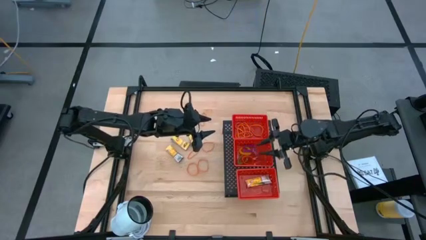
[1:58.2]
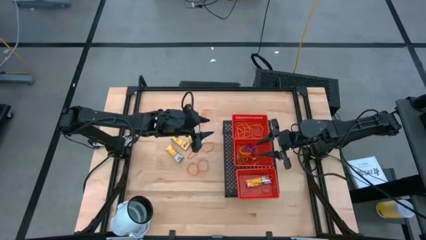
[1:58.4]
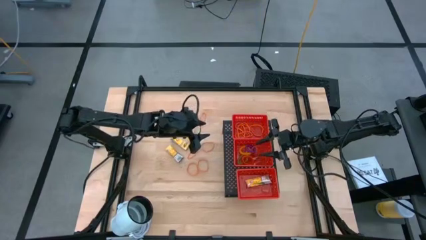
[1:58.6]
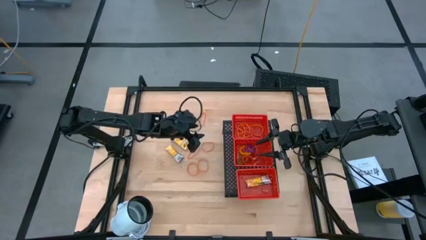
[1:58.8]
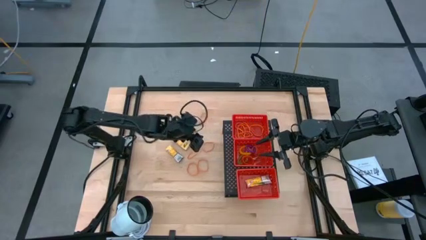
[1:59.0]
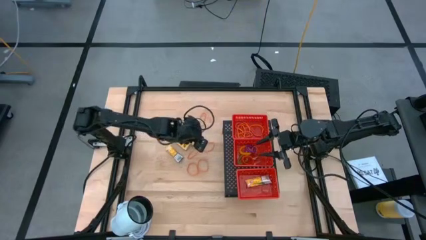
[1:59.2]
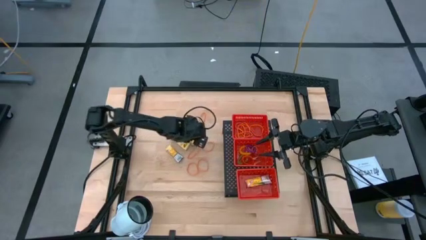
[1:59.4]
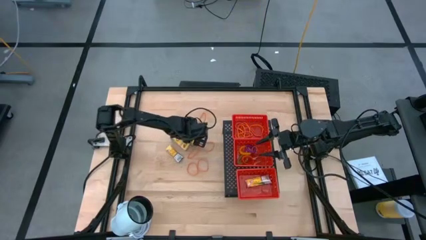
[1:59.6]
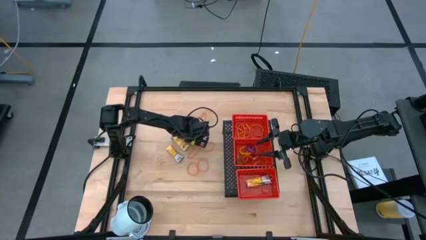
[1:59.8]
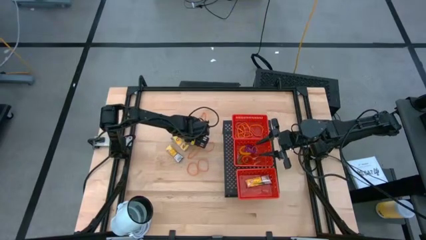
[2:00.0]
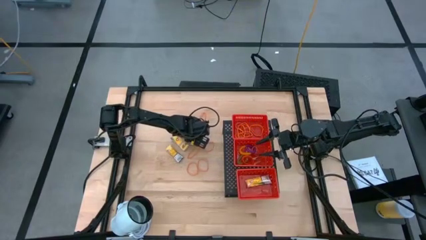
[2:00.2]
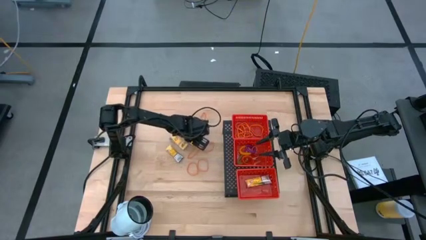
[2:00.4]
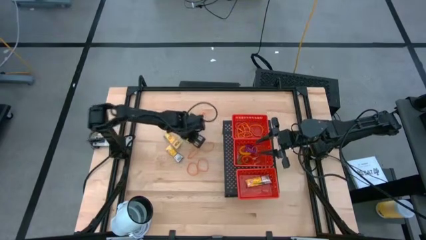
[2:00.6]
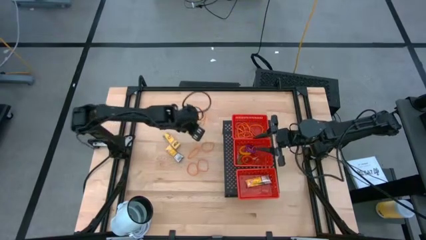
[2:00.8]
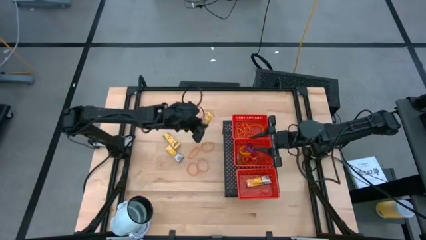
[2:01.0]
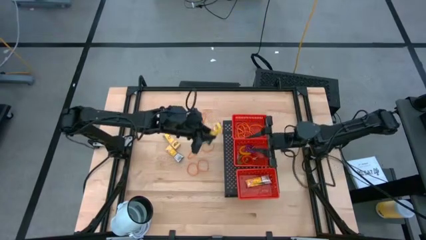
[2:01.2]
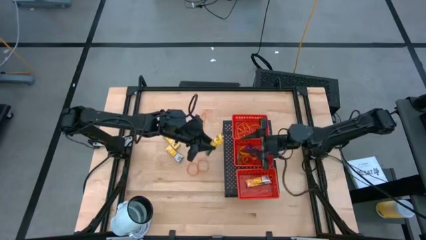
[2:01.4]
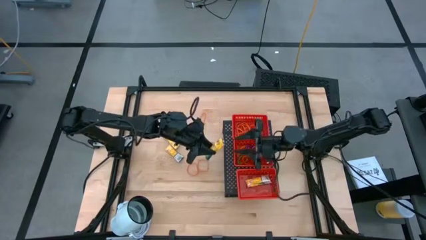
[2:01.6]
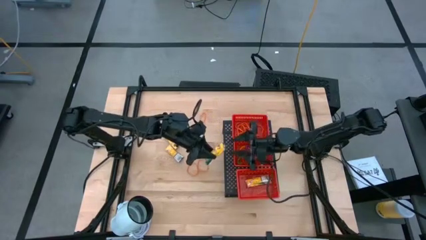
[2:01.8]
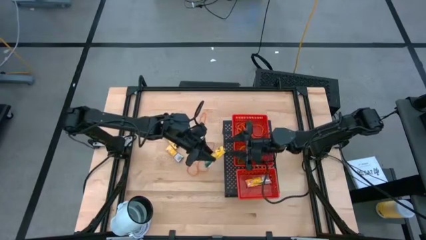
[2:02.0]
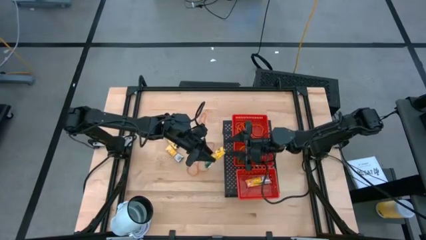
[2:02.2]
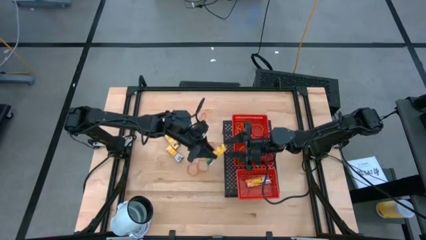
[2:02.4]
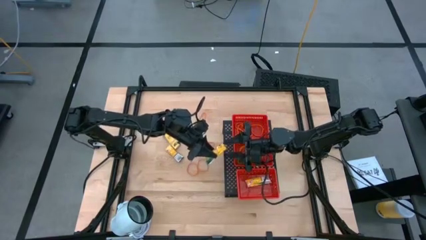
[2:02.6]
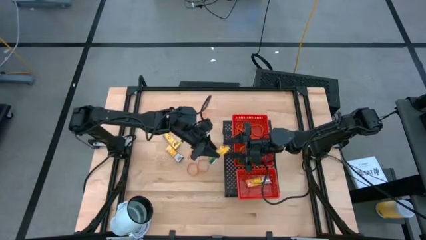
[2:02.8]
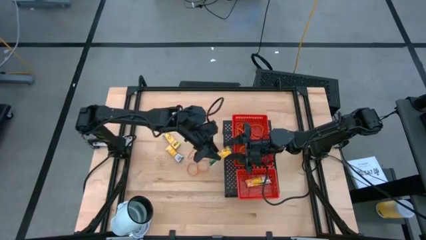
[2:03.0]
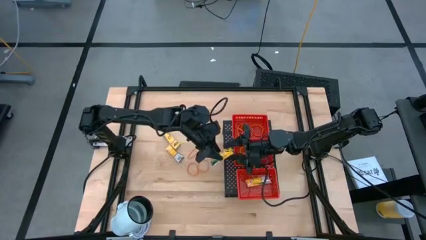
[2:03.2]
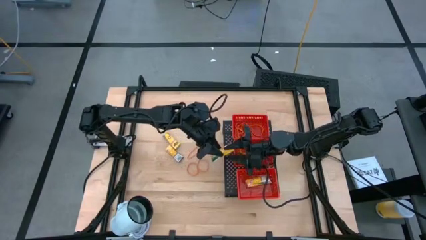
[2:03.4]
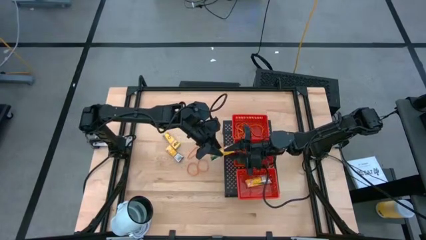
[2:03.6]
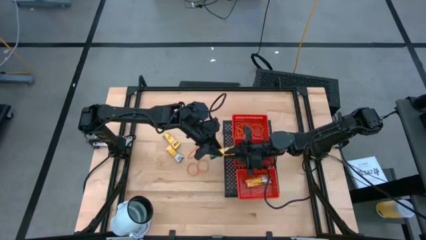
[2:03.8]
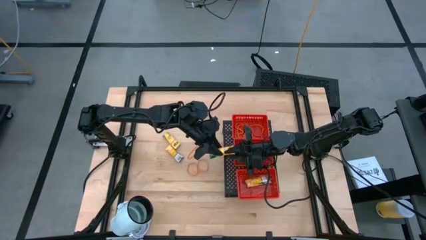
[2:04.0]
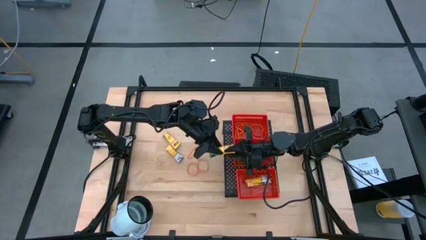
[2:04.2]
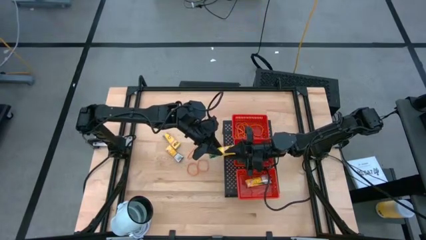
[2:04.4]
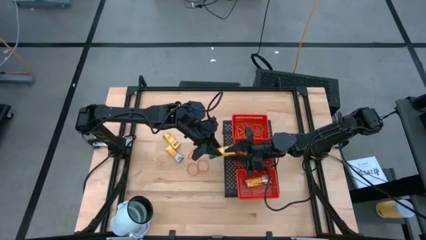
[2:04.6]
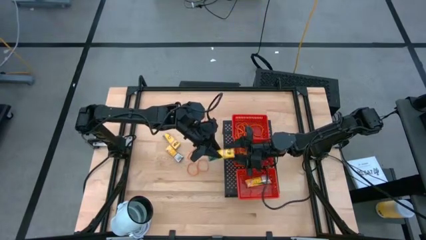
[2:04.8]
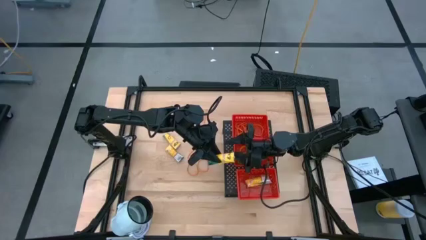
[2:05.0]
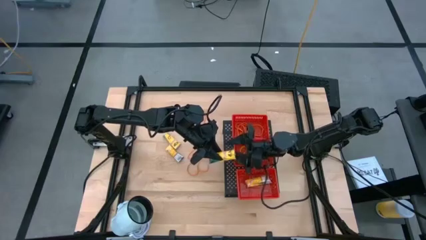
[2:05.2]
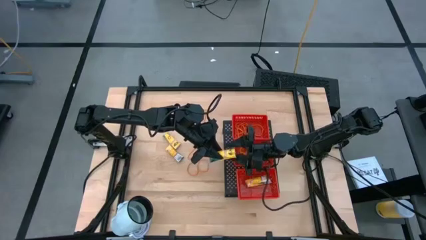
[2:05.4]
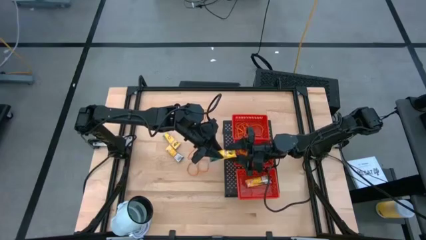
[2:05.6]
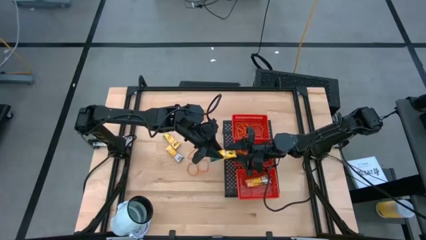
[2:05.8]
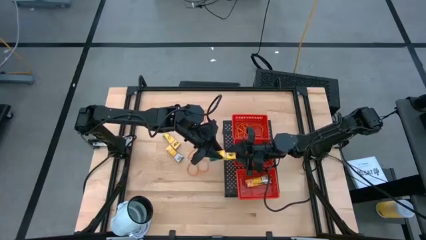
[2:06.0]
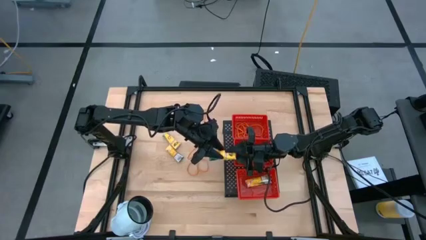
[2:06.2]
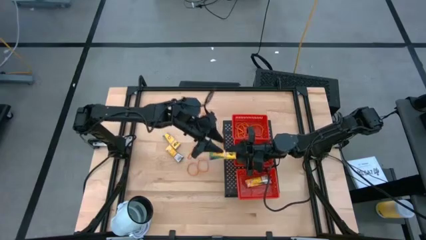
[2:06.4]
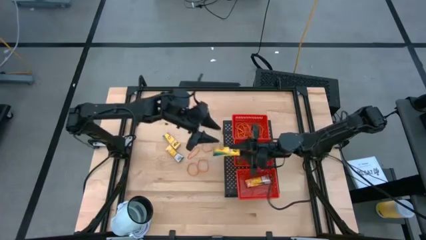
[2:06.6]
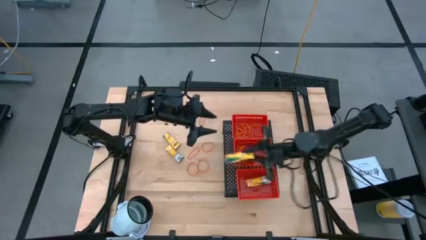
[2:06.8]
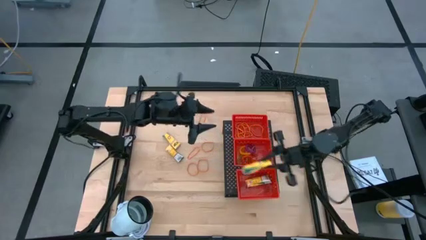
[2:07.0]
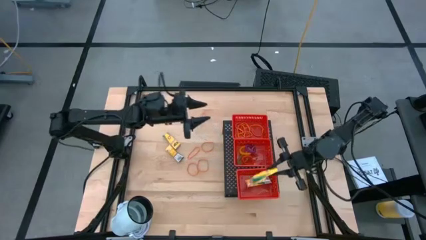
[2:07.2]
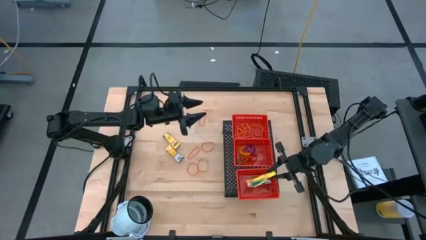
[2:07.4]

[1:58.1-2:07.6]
Task: Pick & Place Office Desk Supplies
Put the yellow pack of crayons into the bottom red bin on the shelf

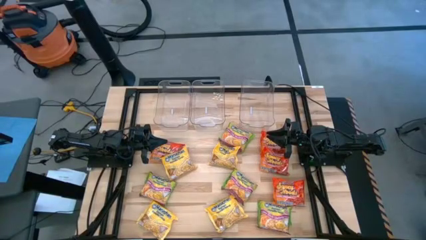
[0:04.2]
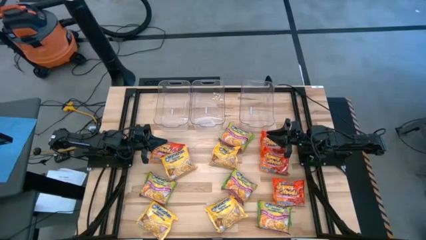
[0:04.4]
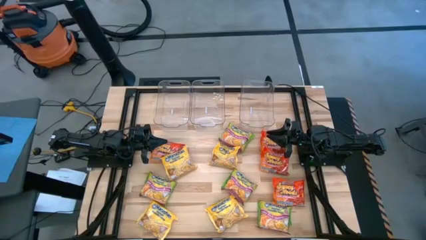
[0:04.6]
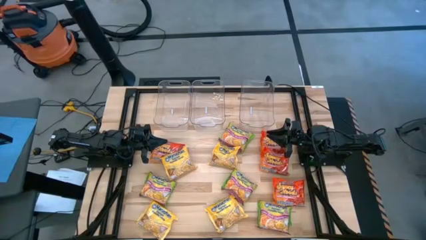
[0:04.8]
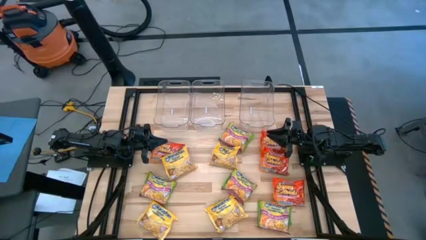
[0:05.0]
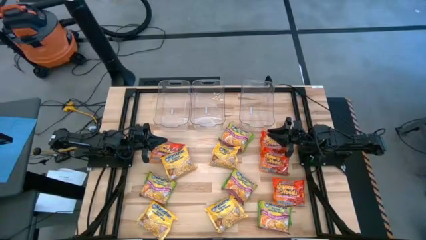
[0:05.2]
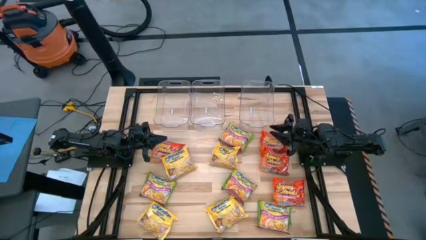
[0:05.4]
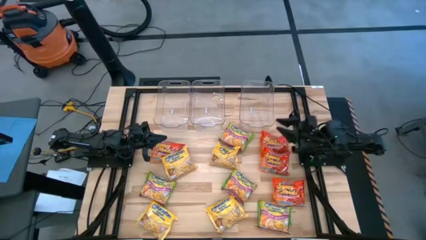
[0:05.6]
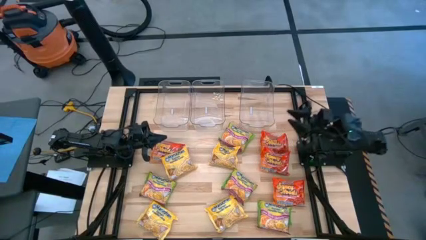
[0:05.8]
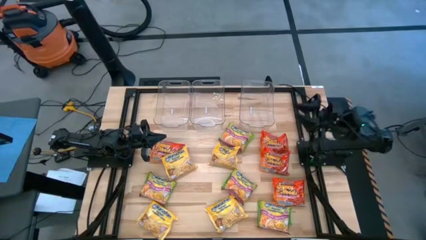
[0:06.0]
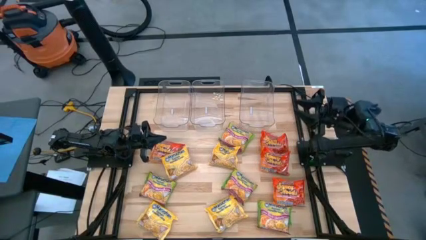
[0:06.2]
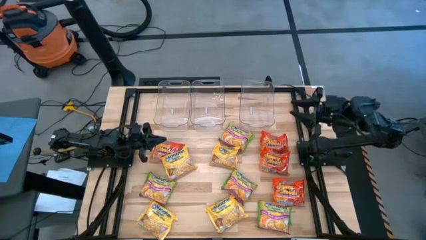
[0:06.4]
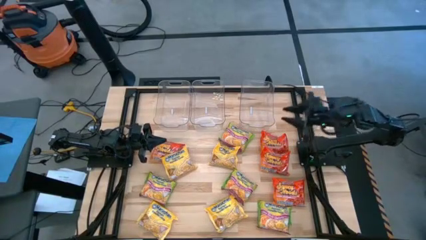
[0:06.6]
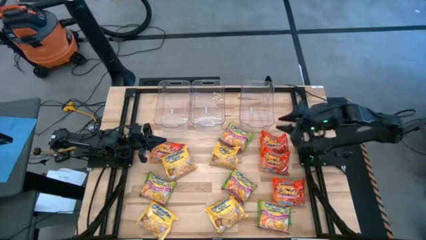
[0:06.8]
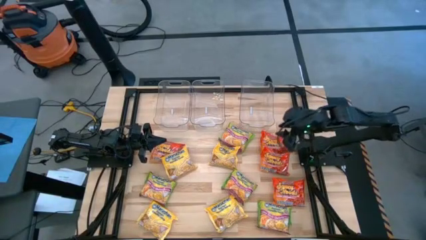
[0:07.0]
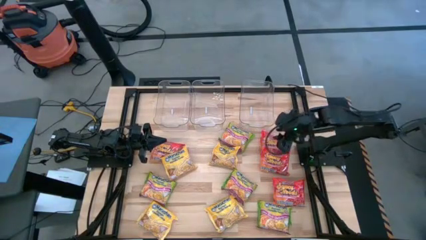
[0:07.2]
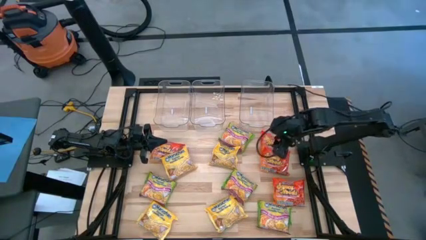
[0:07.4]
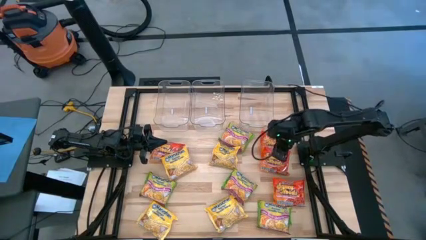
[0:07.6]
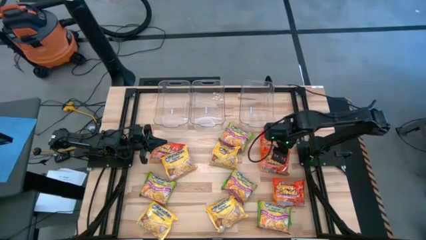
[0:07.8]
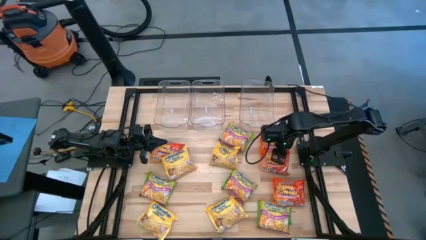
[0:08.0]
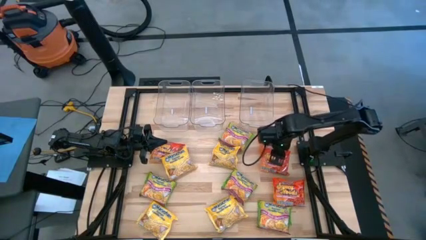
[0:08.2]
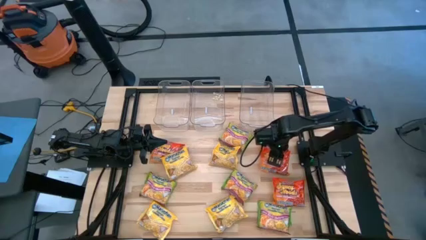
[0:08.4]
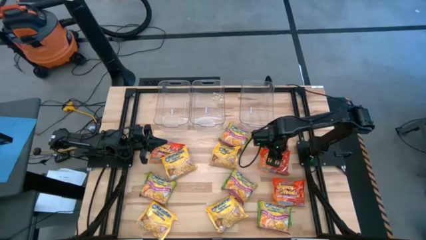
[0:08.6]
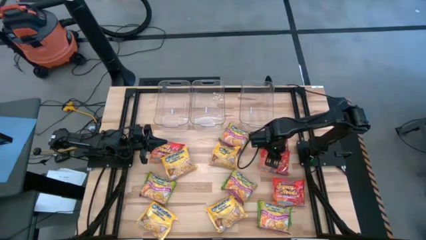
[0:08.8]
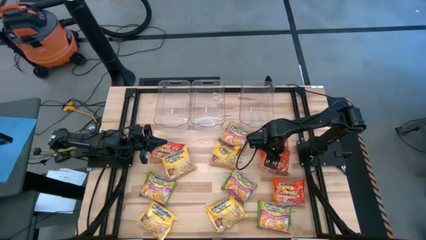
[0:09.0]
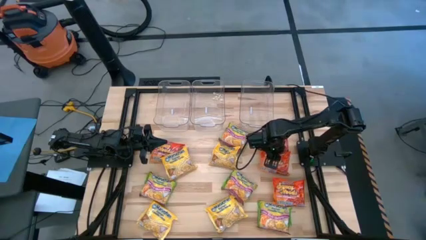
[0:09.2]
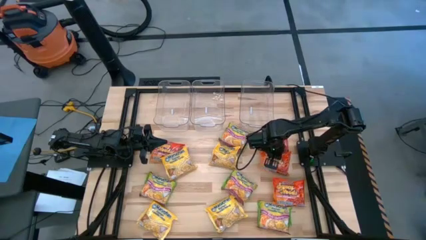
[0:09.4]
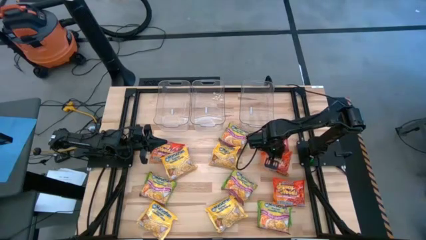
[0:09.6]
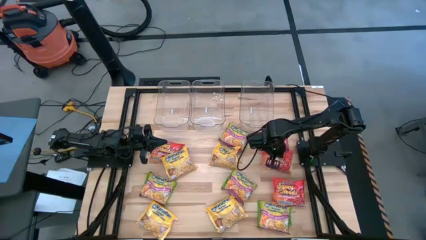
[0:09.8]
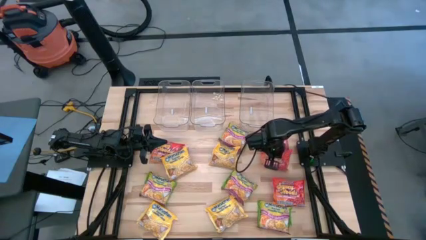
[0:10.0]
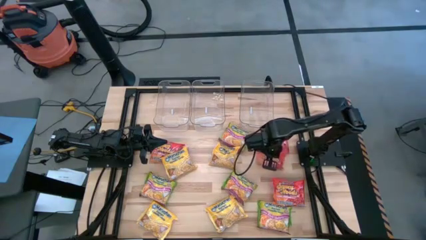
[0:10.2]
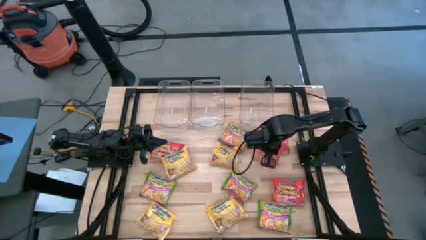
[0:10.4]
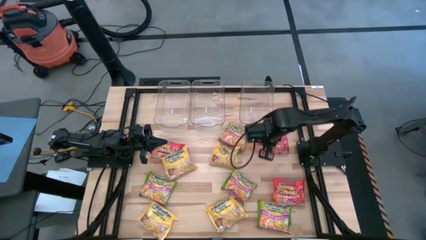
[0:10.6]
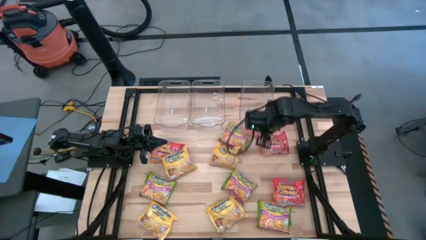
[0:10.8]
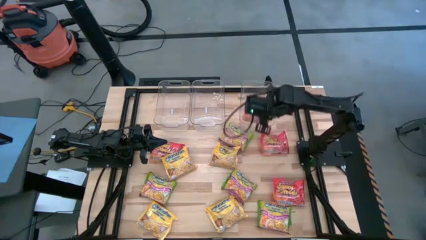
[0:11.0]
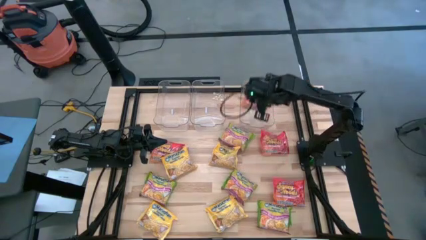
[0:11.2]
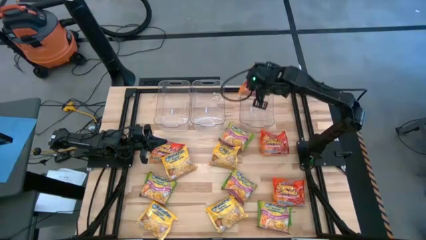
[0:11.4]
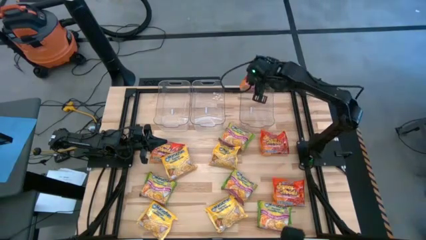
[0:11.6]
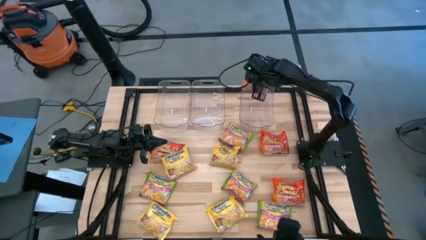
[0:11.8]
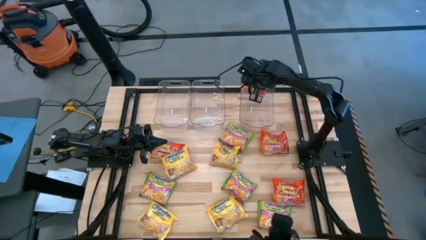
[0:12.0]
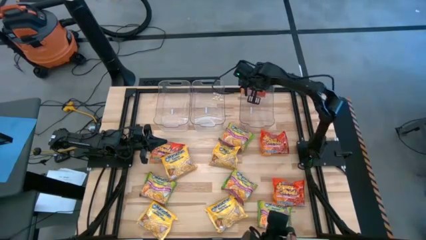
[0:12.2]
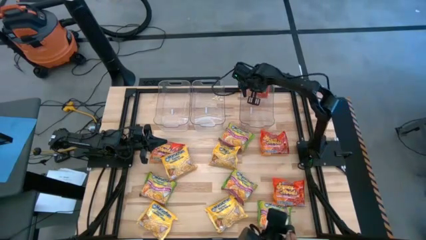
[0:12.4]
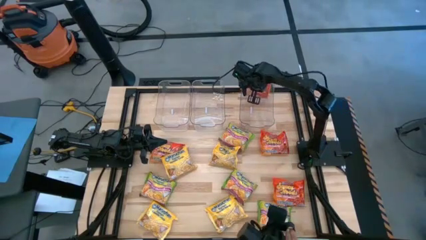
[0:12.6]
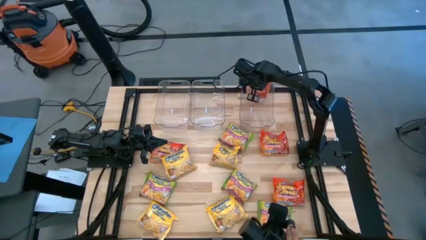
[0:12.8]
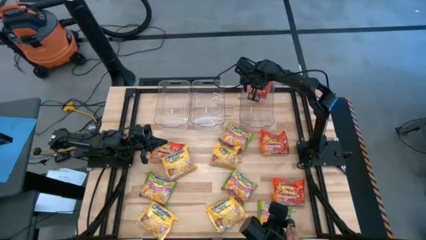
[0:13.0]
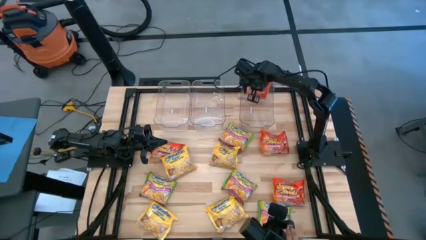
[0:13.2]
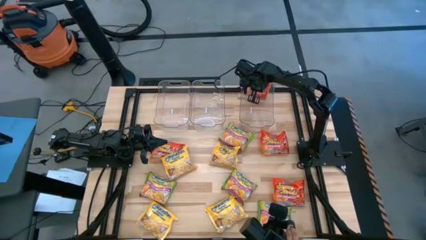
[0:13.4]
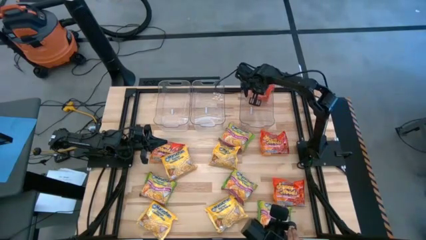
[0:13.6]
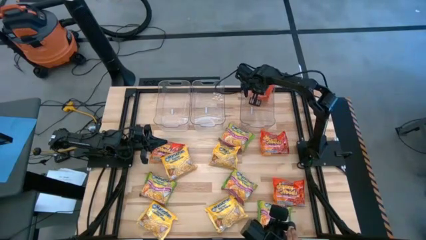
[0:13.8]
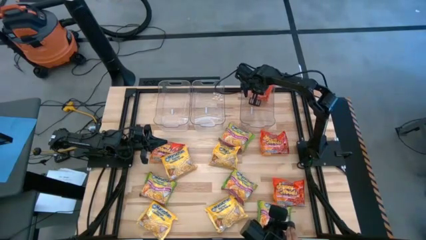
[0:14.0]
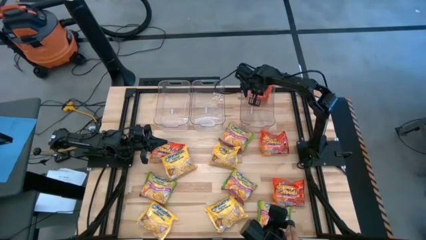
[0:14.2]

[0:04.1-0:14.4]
Task: Sort Maruchan noodles
Put the orange noodle pack into the right transparent bin
